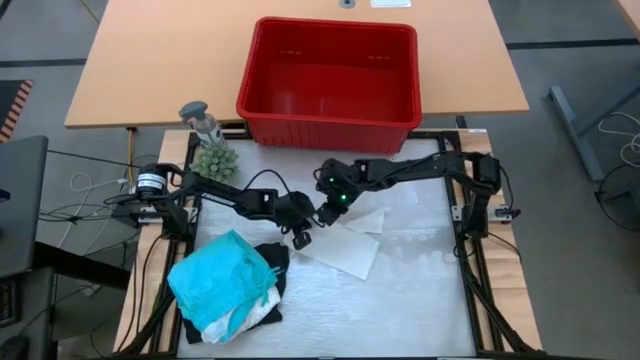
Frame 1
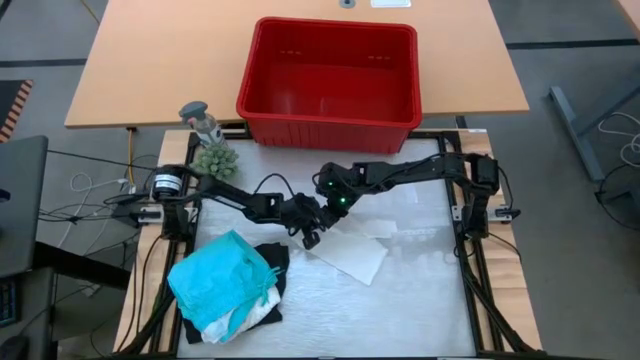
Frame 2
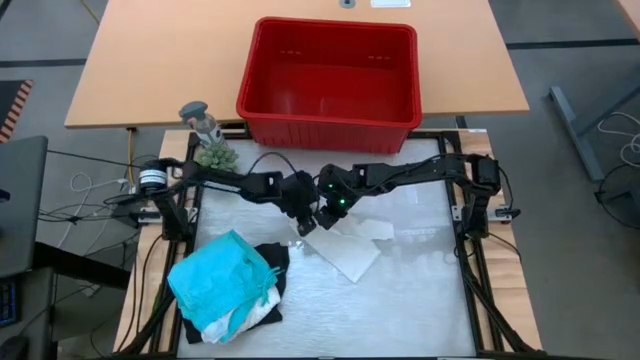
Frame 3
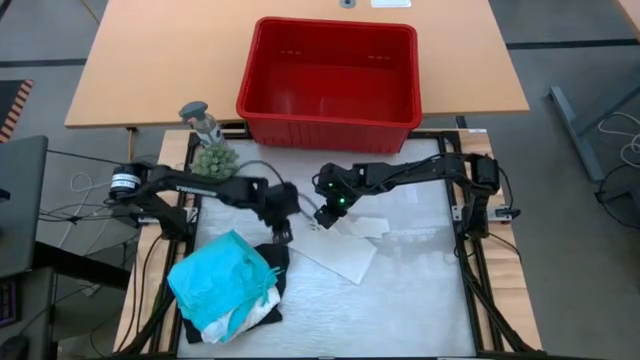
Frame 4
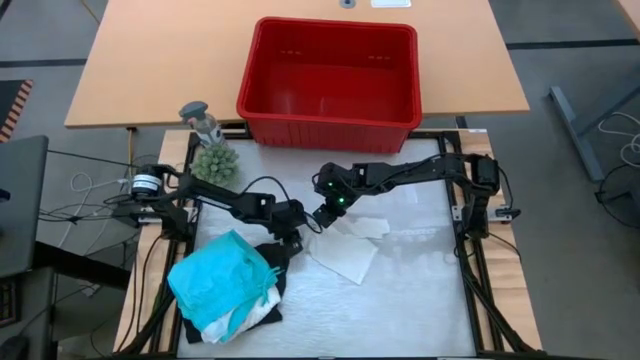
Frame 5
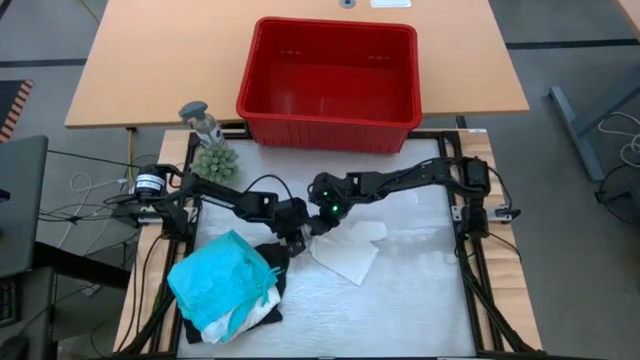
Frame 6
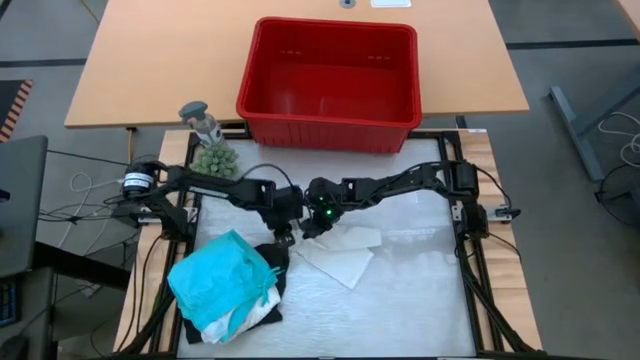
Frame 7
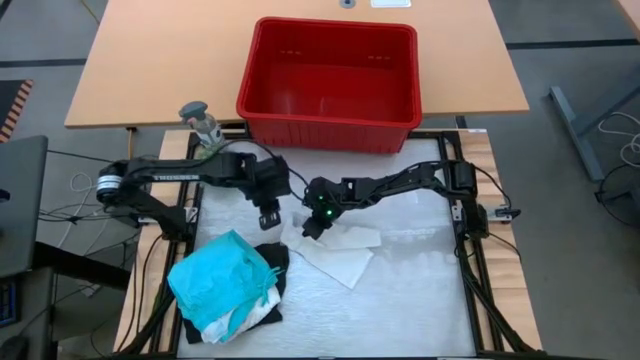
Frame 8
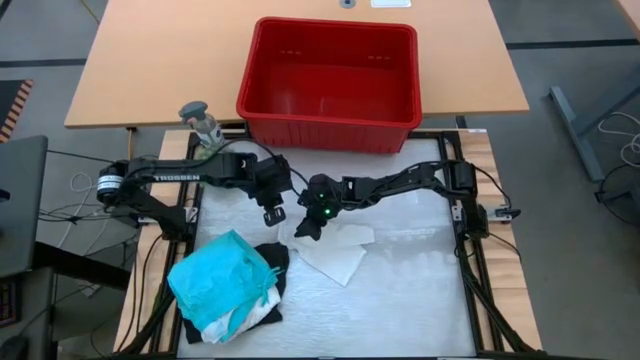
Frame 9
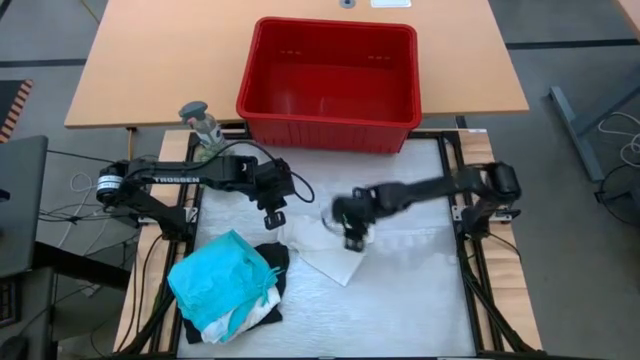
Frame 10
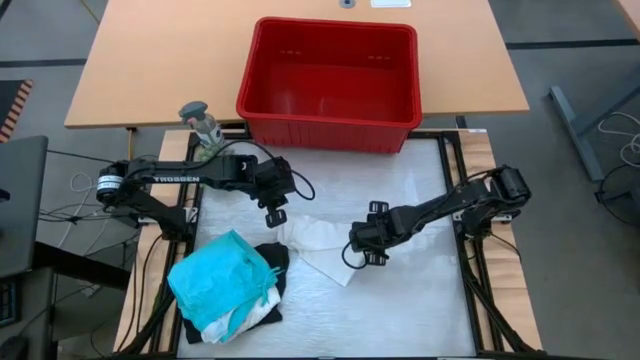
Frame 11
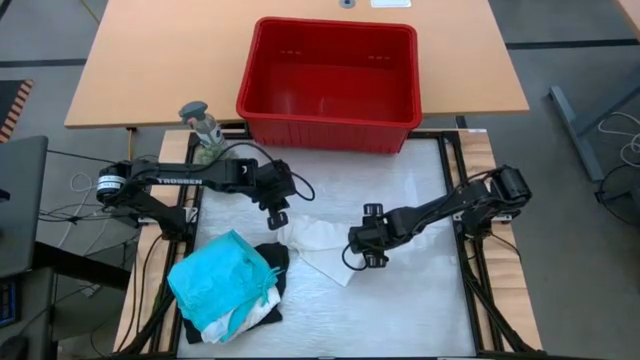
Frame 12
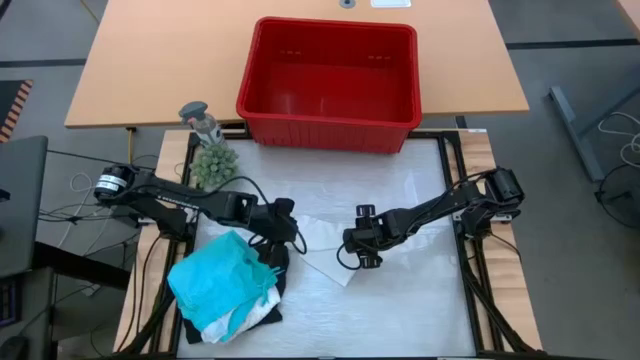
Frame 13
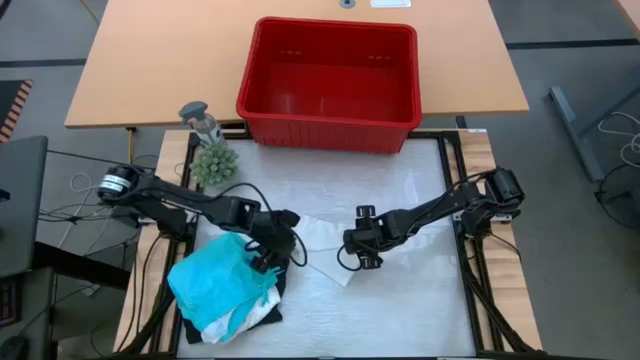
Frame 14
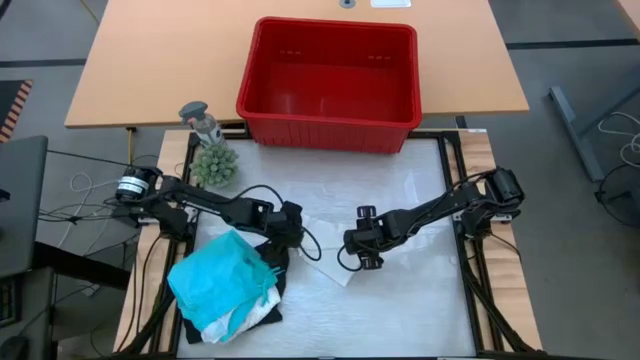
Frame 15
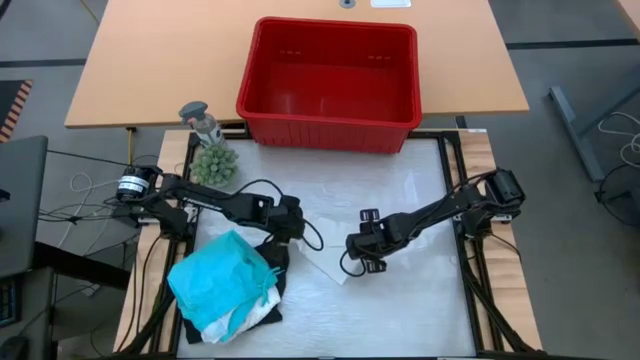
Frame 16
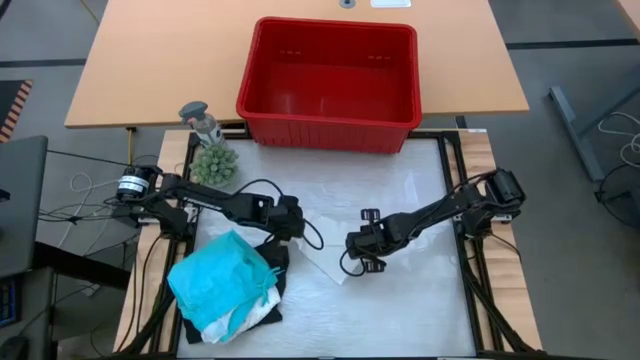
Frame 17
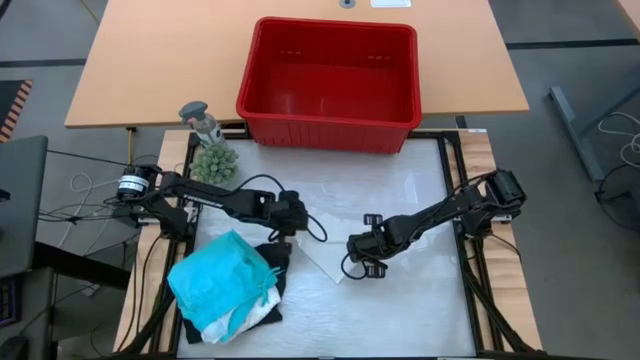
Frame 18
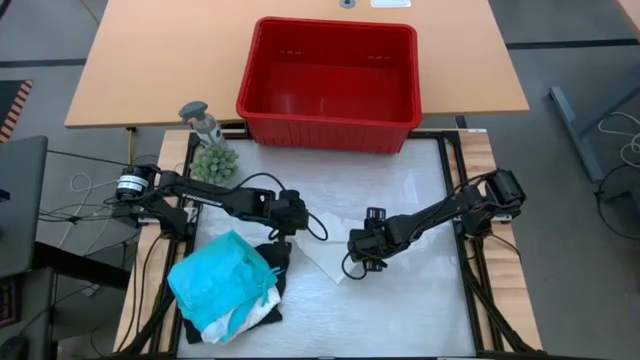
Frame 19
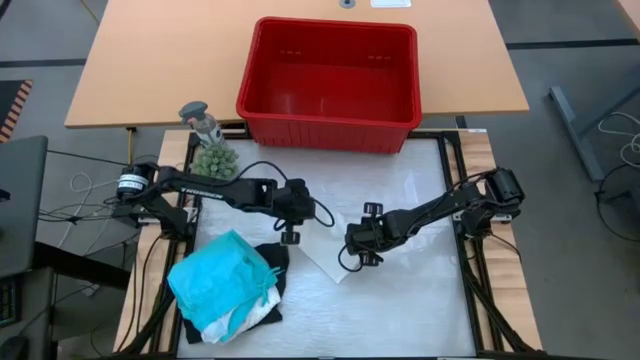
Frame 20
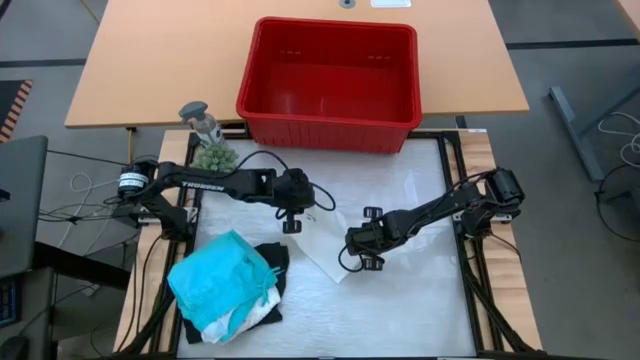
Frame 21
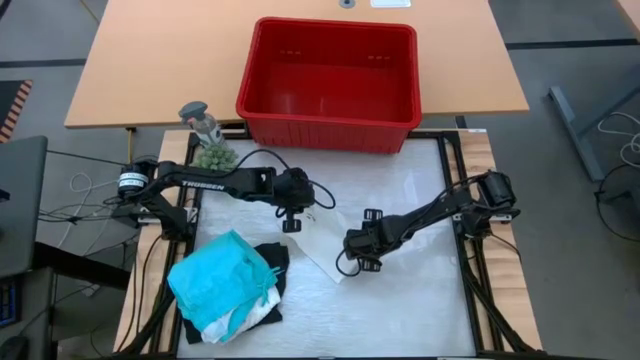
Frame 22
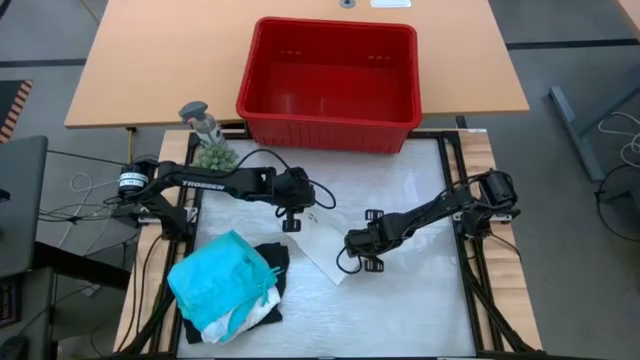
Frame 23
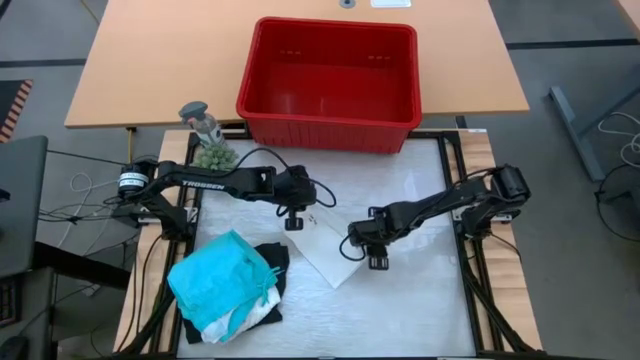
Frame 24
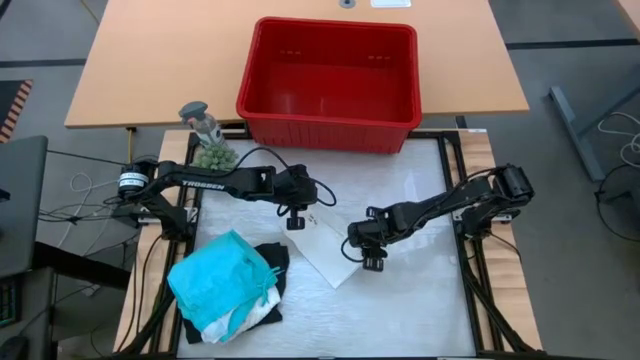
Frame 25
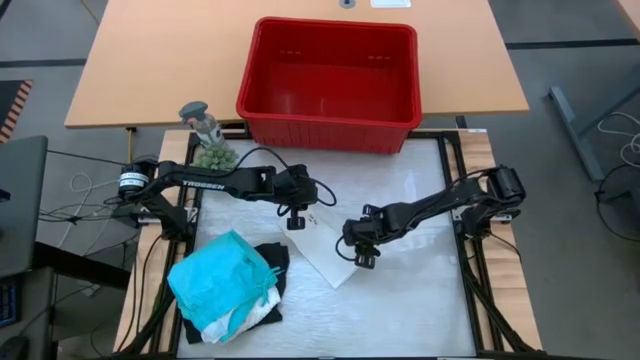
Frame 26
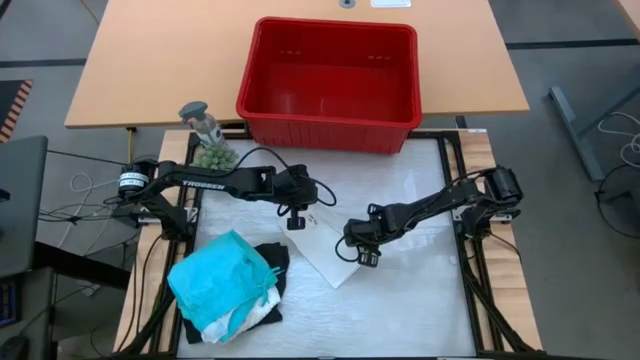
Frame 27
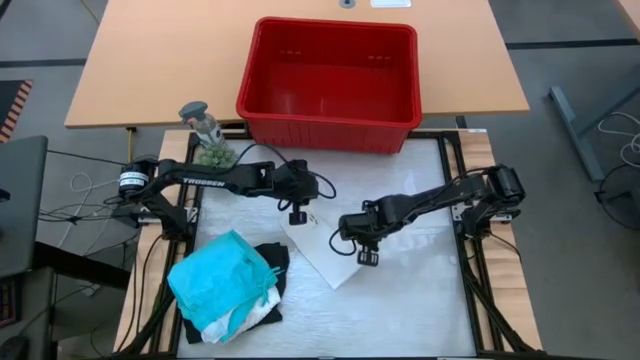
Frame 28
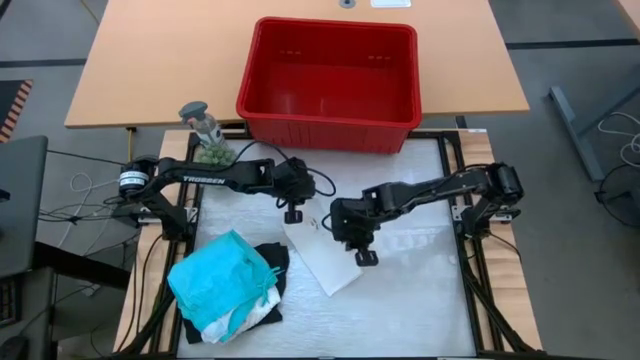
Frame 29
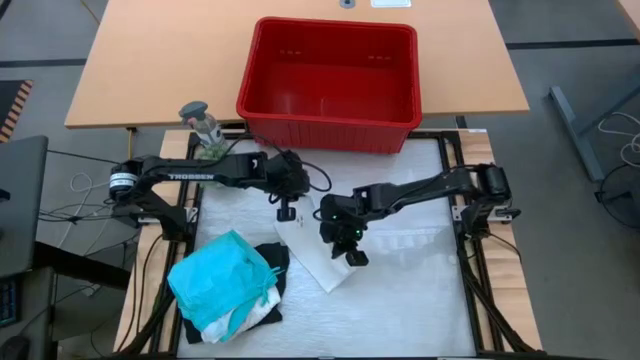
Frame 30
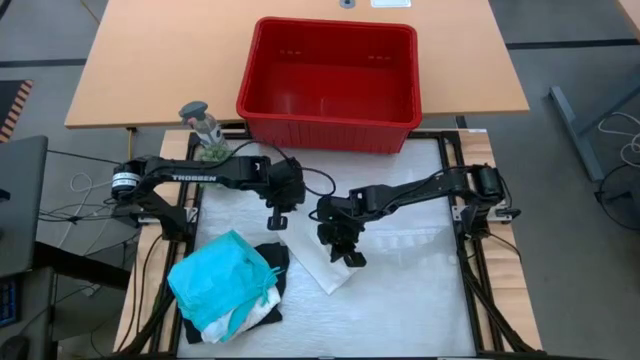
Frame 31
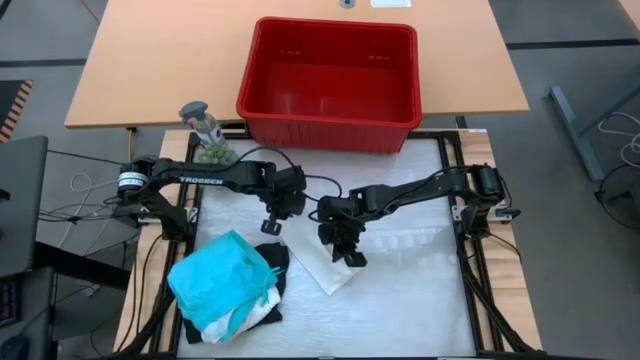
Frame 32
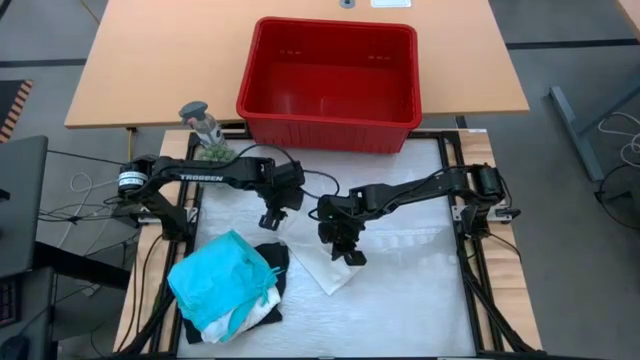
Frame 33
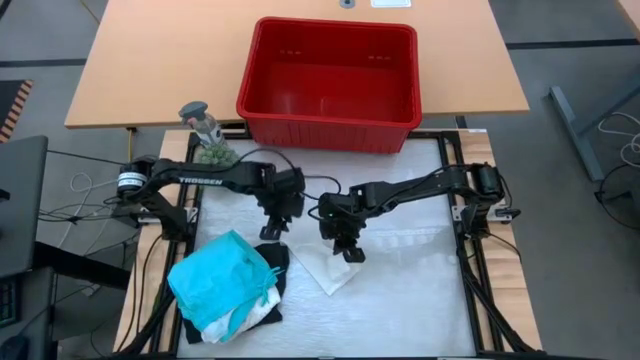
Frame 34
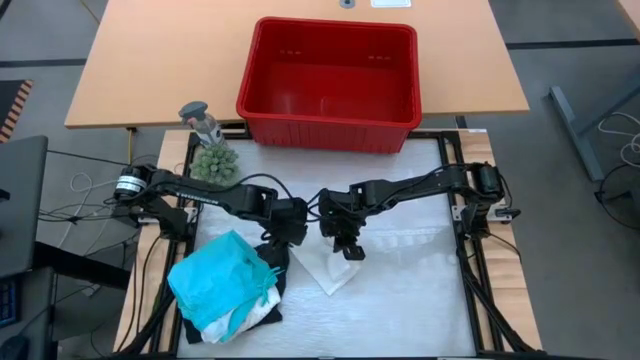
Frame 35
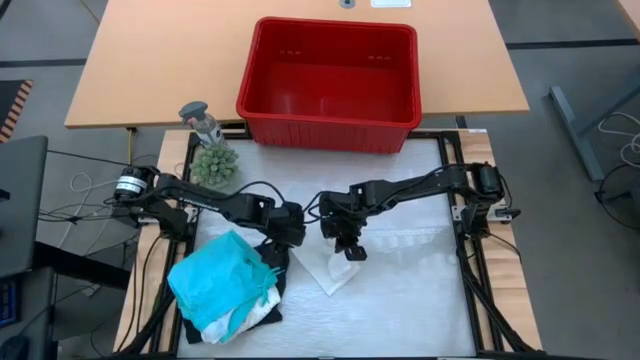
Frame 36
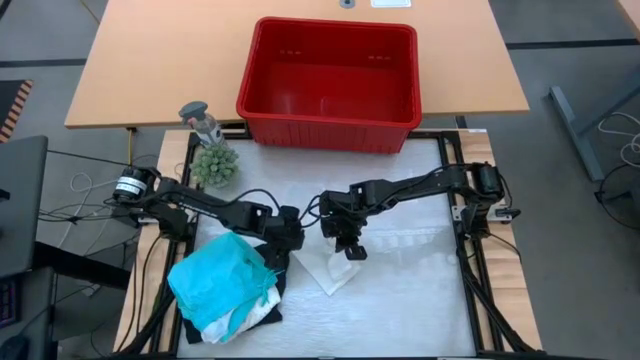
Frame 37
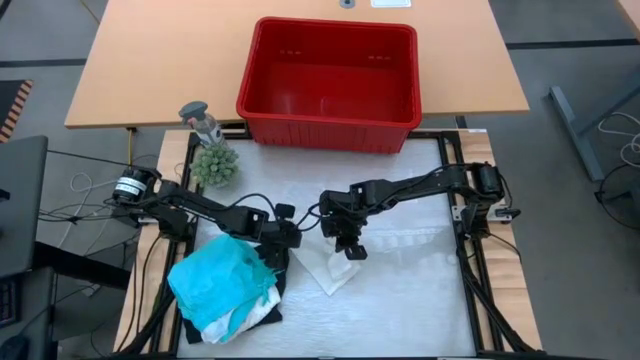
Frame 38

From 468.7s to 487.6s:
Task: Fold Laundry from Bin
Fold the white shorts
